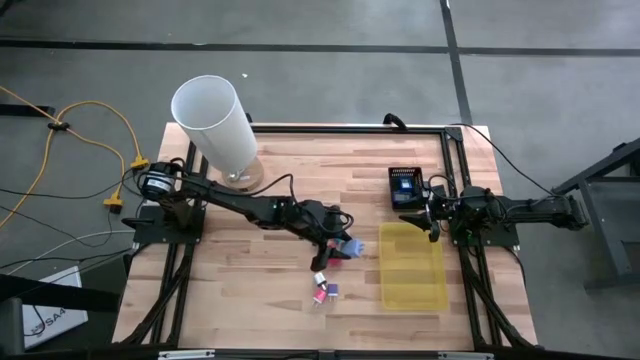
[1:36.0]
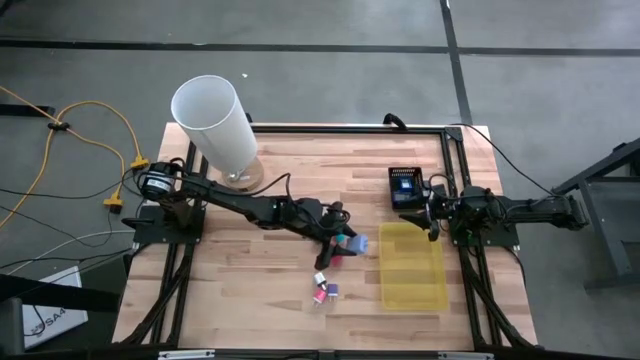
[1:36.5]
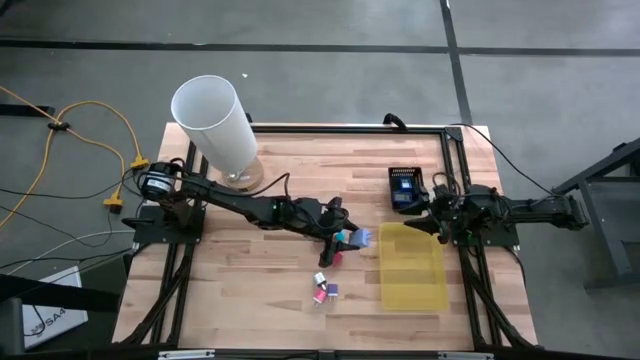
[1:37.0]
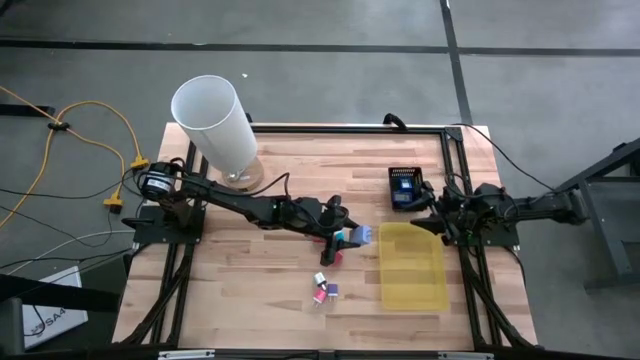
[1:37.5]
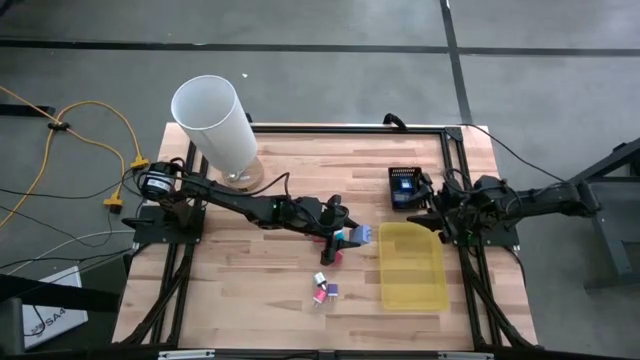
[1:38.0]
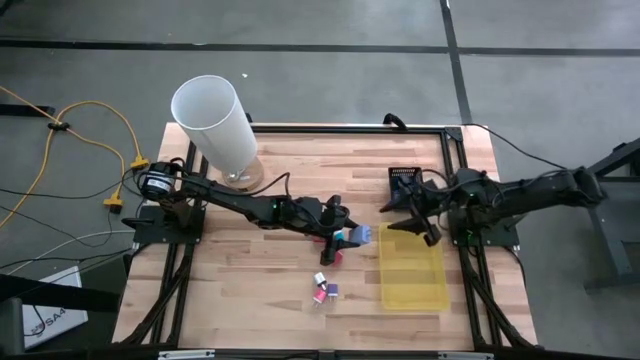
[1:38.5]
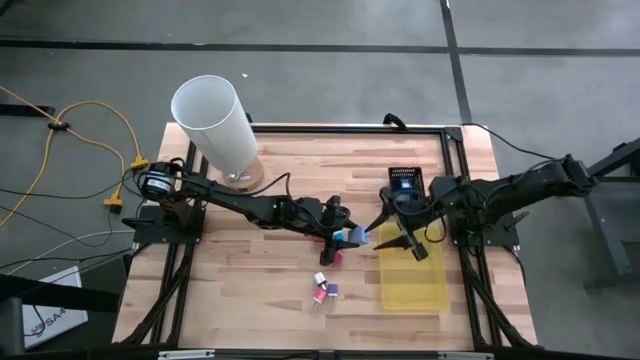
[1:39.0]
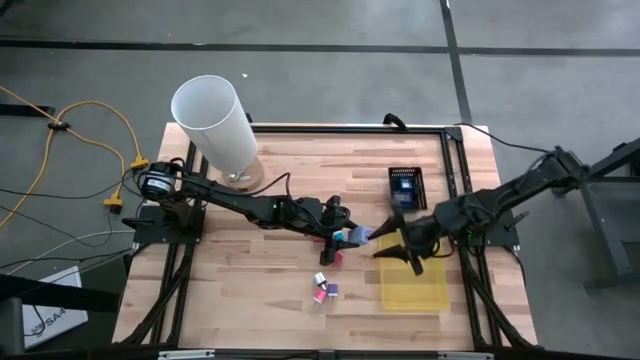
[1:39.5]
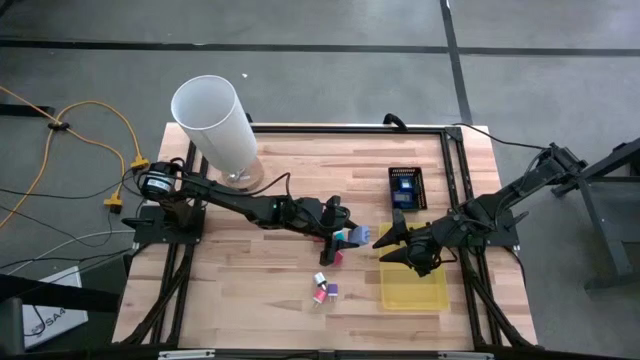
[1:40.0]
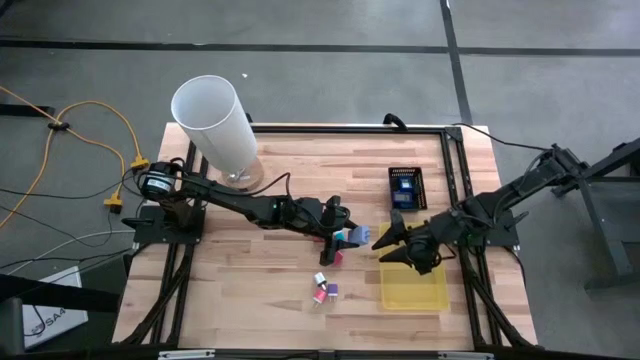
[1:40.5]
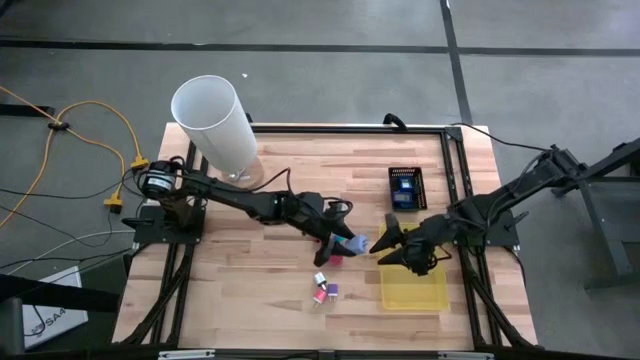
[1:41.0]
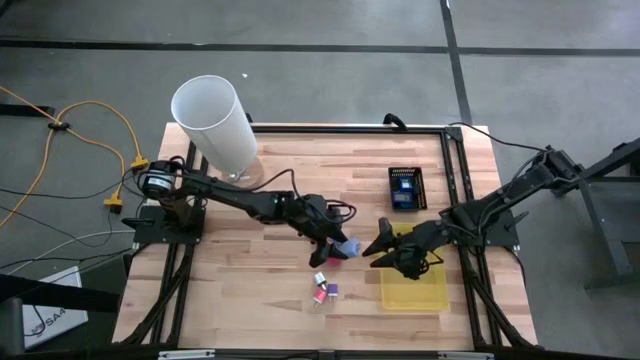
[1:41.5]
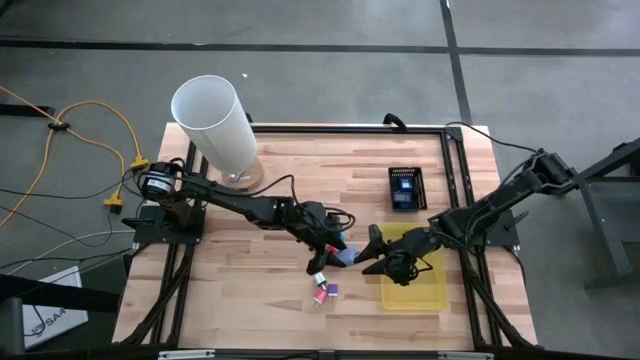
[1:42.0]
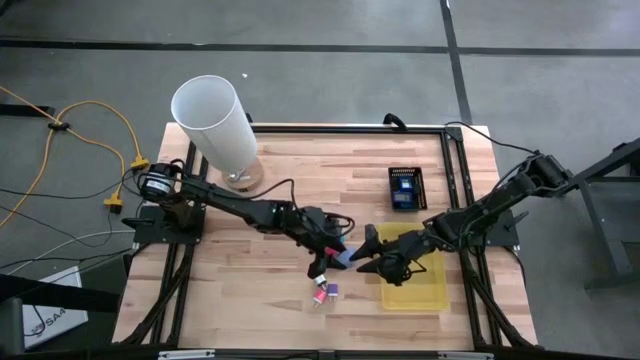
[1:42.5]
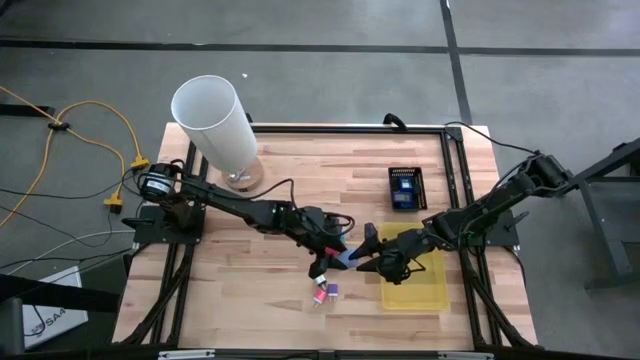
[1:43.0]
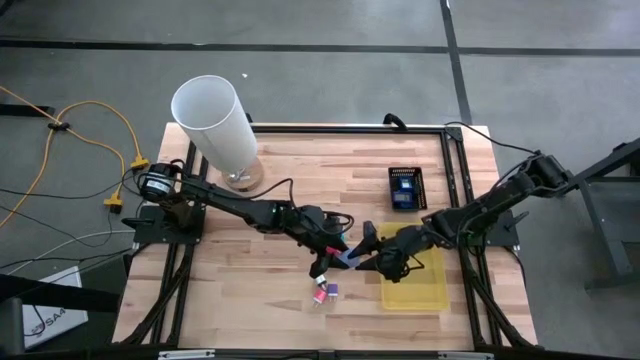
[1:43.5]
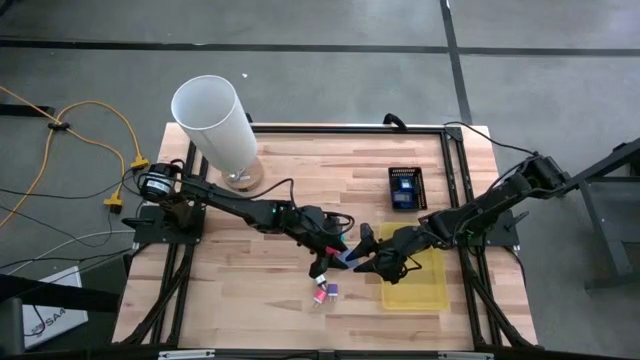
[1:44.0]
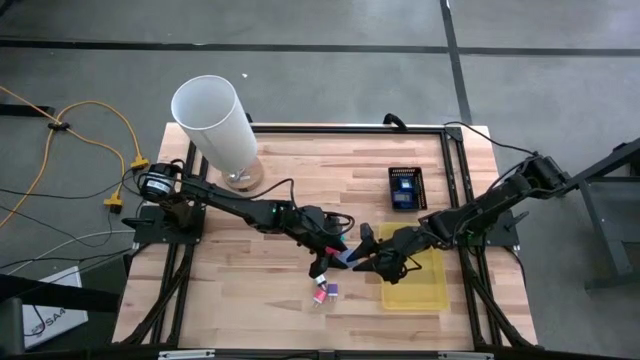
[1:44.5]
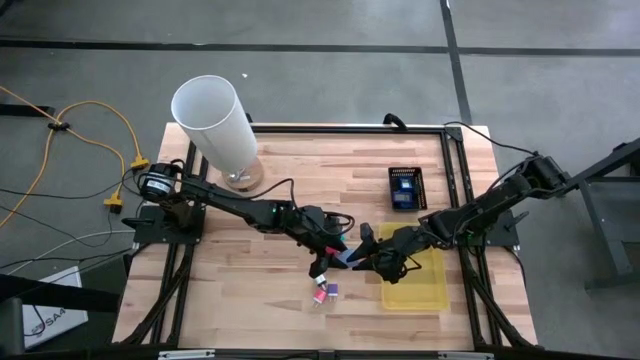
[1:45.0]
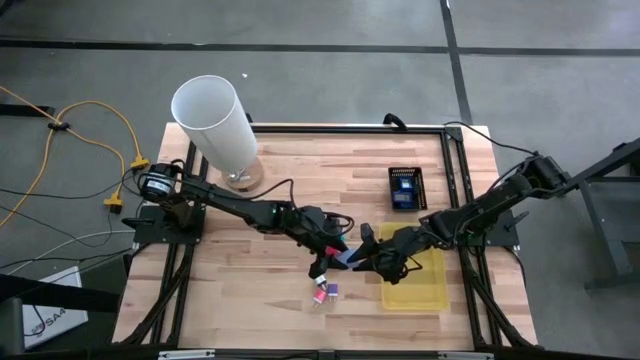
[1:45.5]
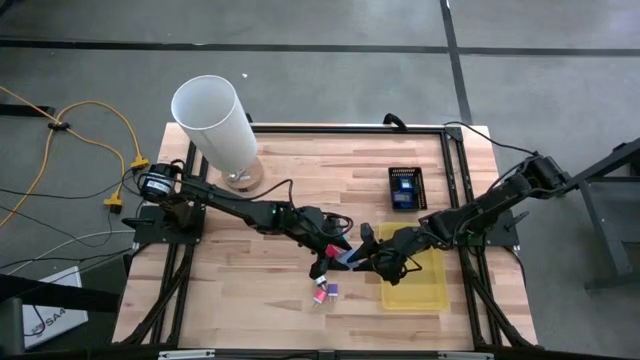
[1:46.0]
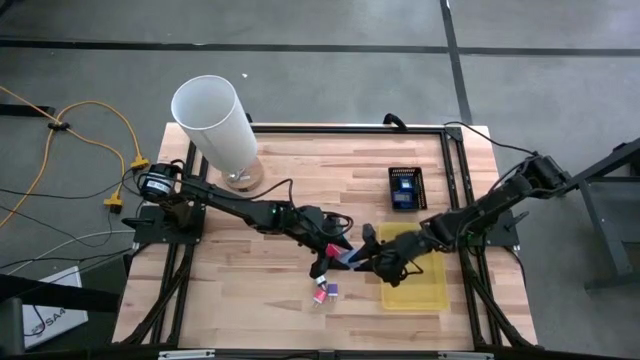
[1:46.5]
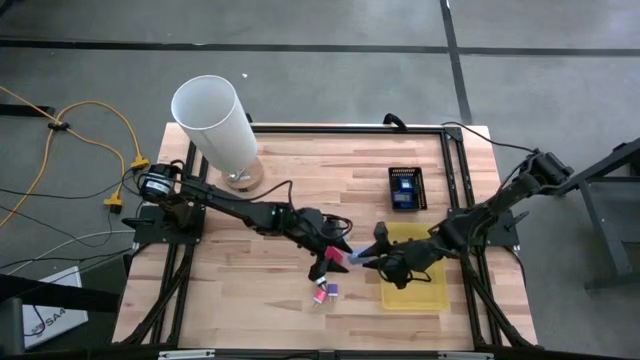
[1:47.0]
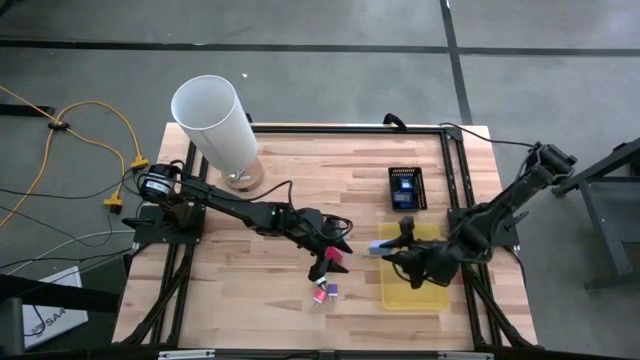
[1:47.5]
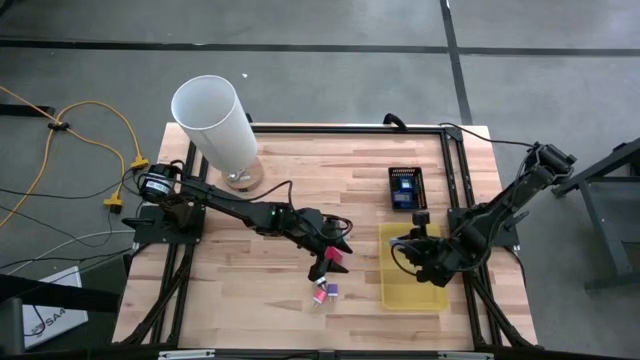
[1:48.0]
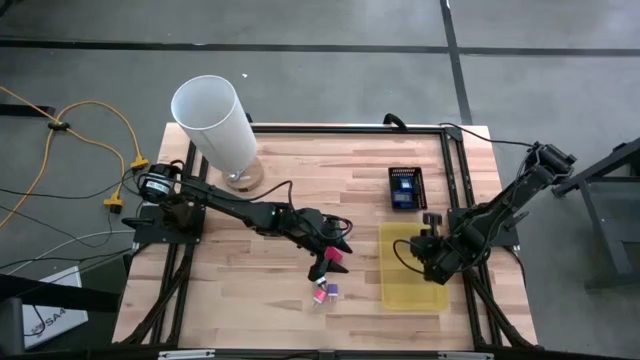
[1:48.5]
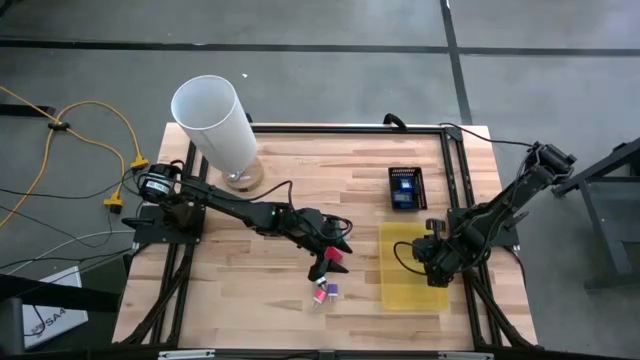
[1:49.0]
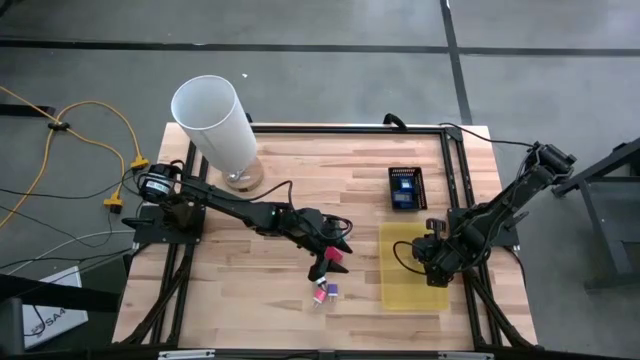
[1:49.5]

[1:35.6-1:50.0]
Task: Pick & Place Office items
Put the blue charger adapter into the yellow bin

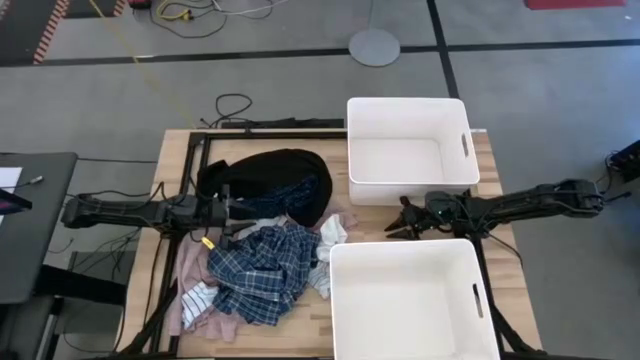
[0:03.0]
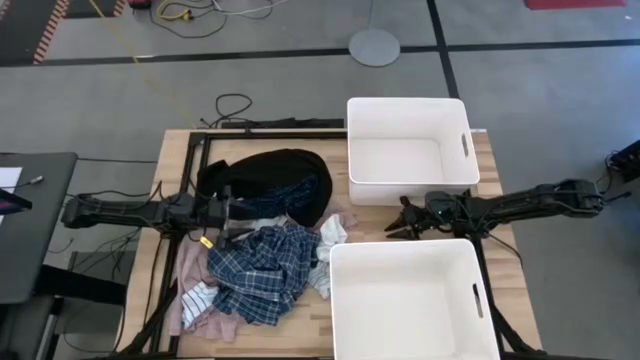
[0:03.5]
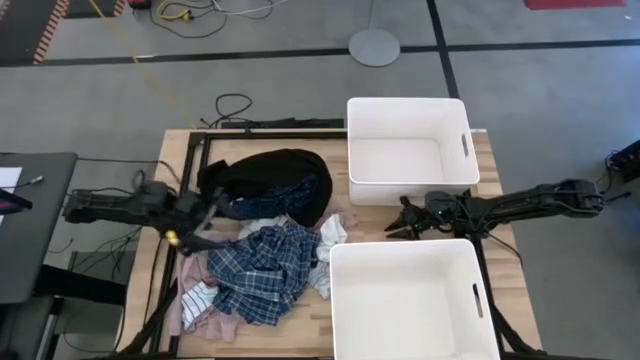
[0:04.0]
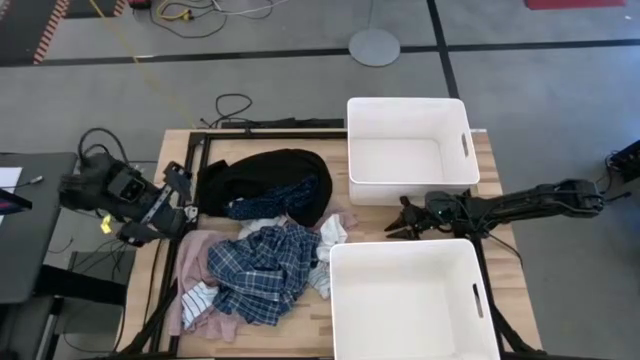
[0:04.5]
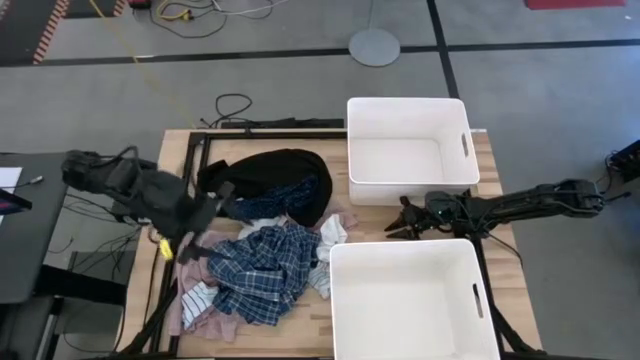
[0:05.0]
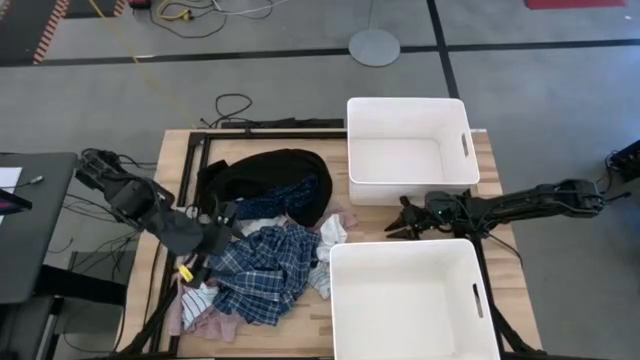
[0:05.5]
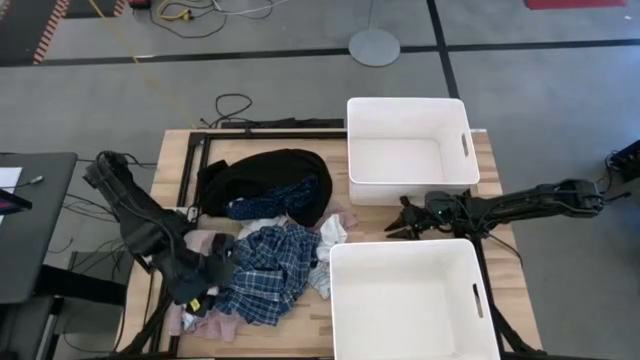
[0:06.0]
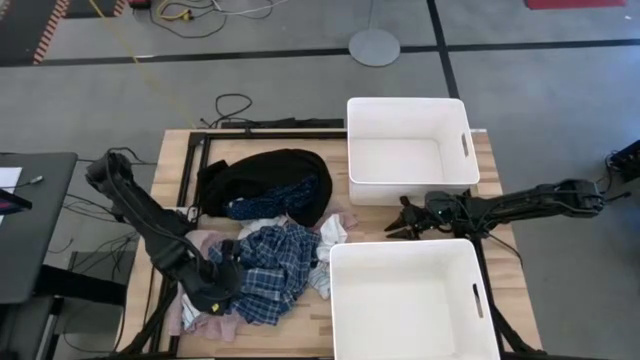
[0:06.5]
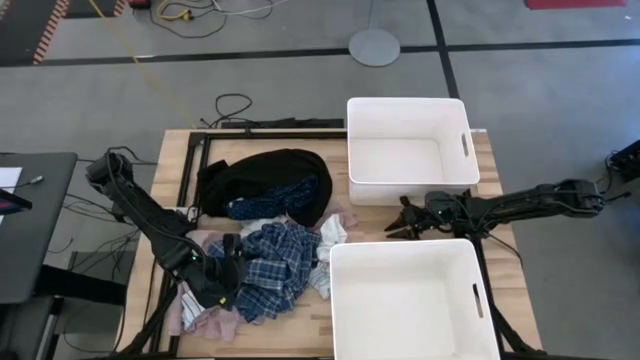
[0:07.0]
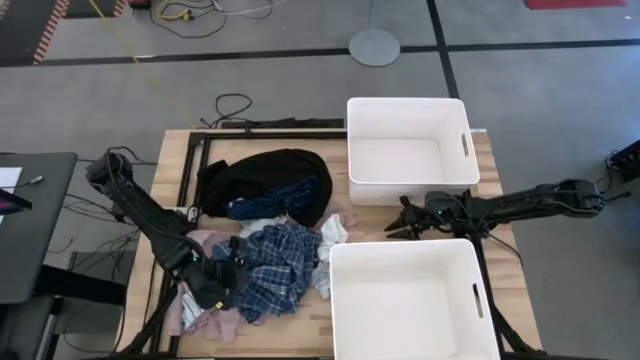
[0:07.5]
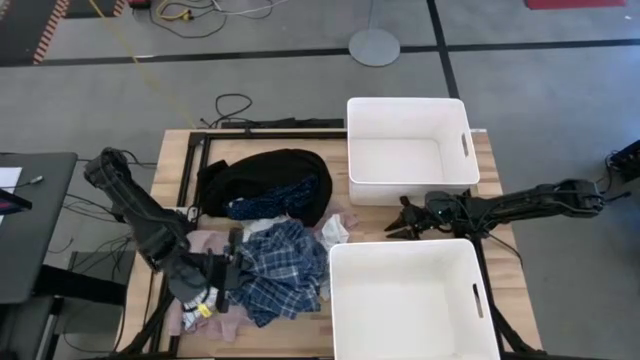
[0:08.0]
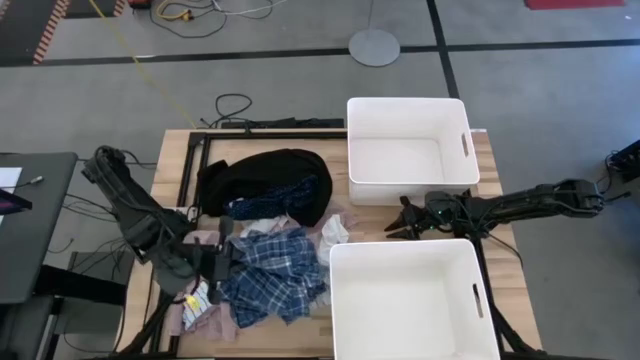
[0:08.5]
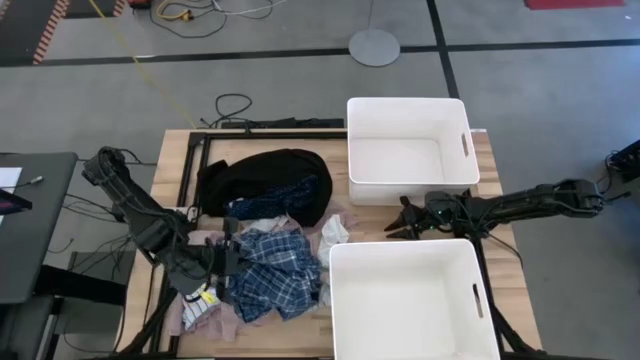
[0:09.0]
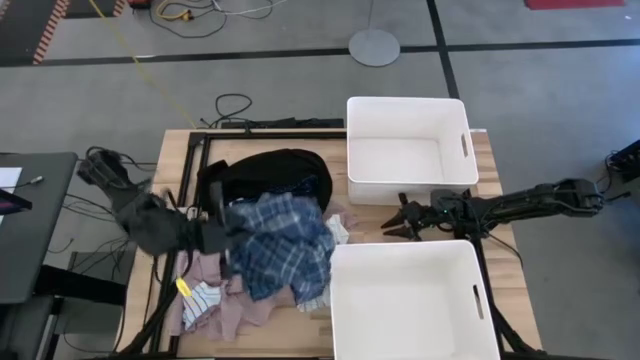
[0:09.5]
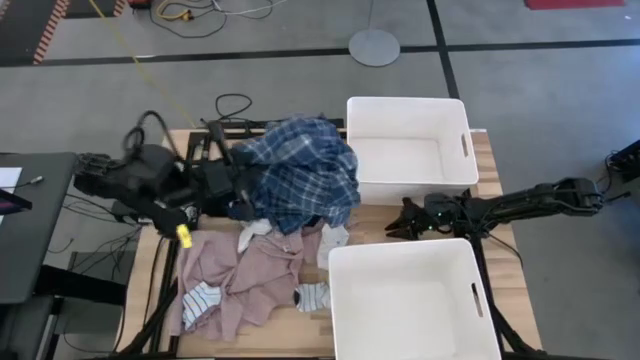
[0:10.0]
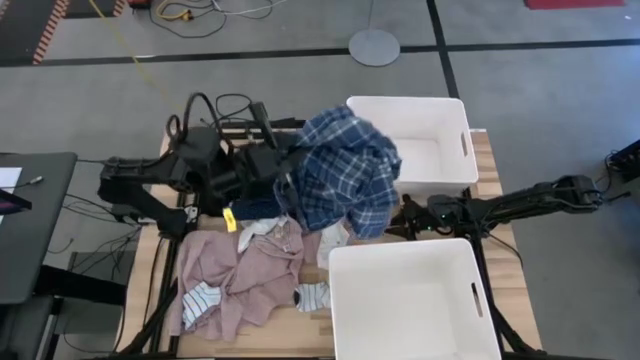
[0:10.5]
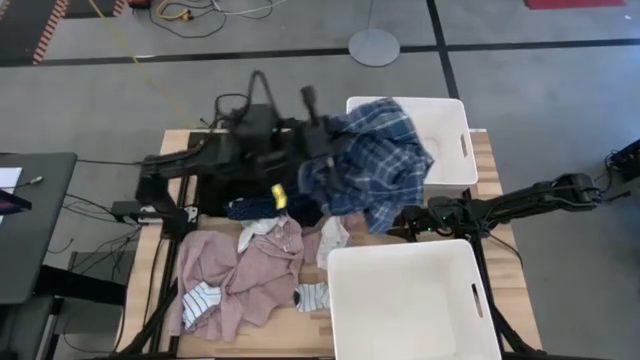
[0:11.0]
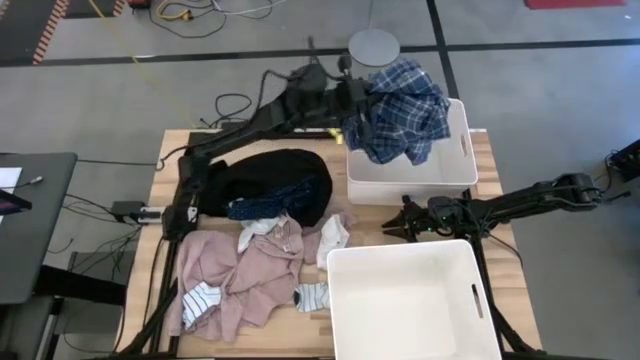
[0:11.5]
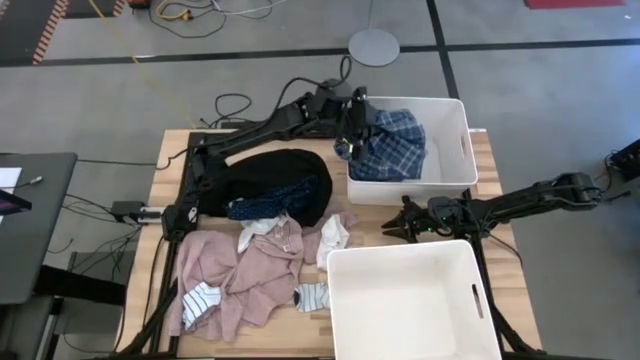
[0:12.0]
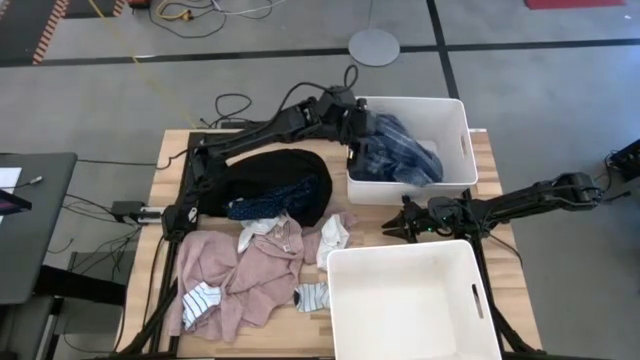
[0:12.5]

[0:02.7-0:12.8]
Task: Sort clothes
Put the blue checkered pants into the top white laundry bin
